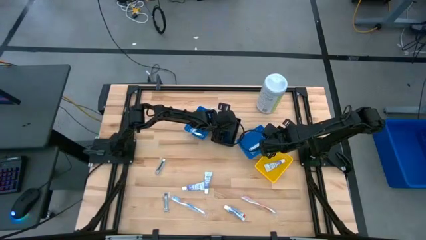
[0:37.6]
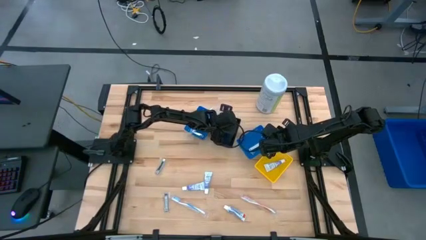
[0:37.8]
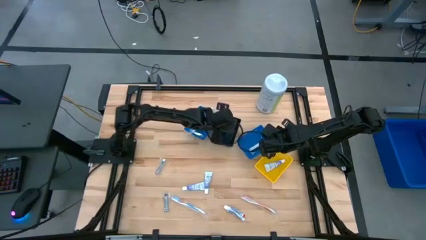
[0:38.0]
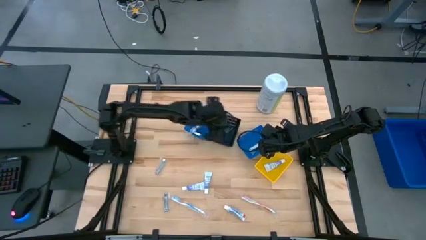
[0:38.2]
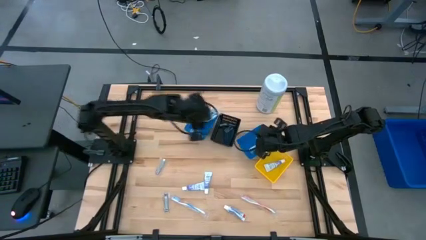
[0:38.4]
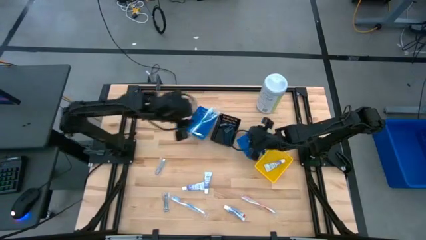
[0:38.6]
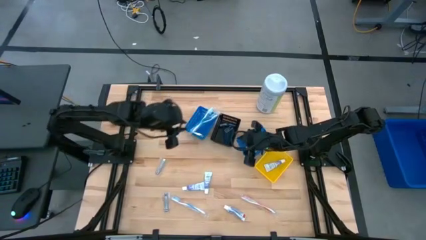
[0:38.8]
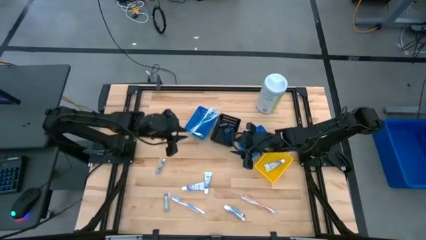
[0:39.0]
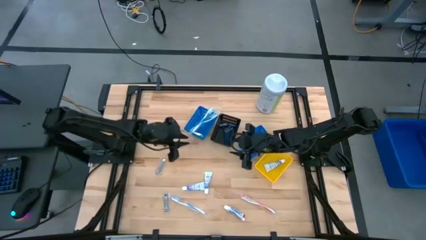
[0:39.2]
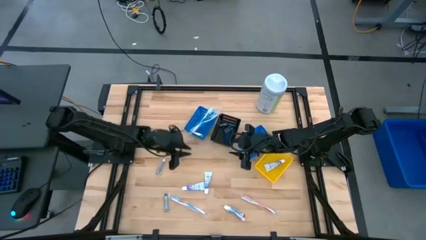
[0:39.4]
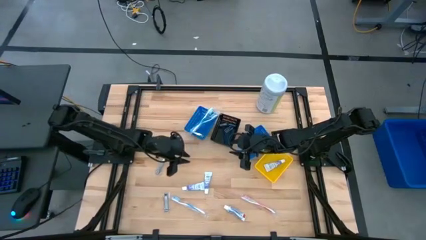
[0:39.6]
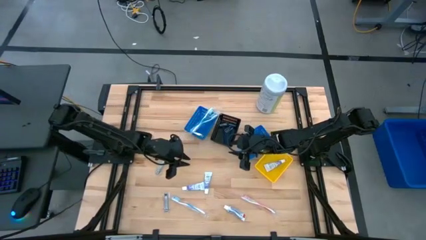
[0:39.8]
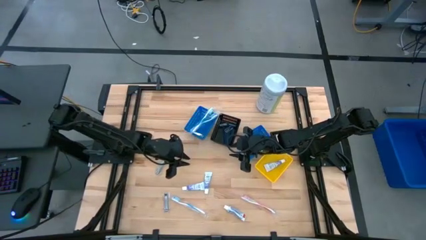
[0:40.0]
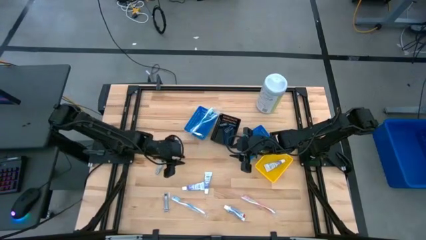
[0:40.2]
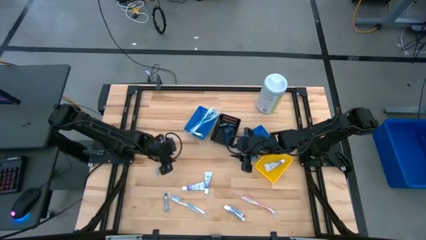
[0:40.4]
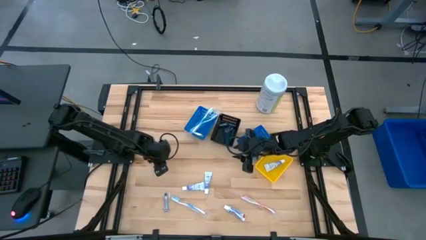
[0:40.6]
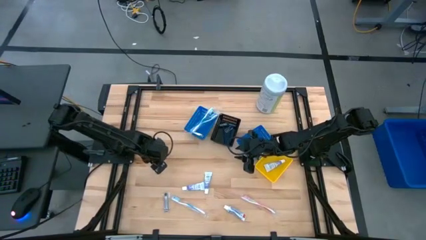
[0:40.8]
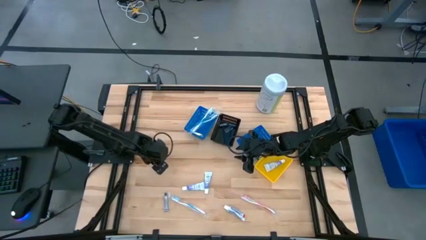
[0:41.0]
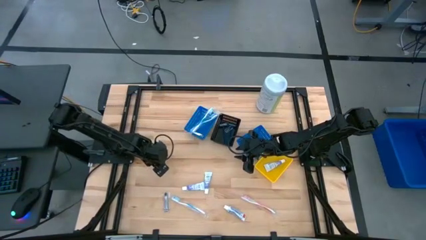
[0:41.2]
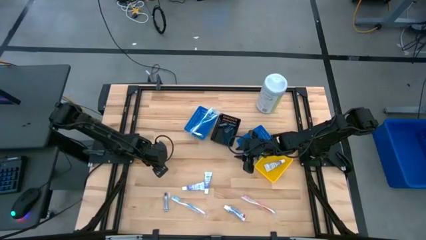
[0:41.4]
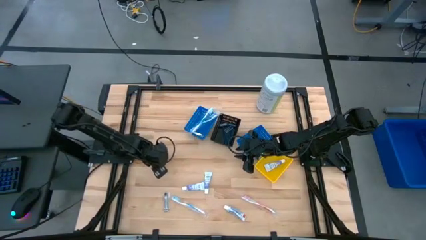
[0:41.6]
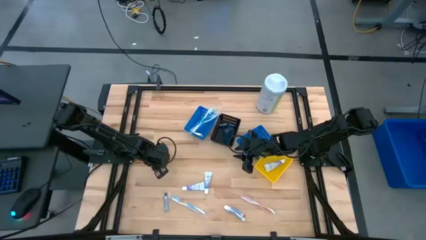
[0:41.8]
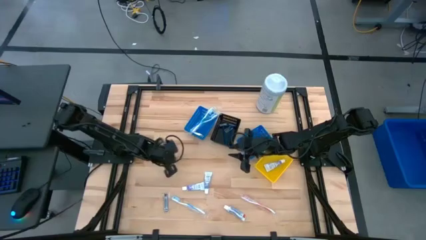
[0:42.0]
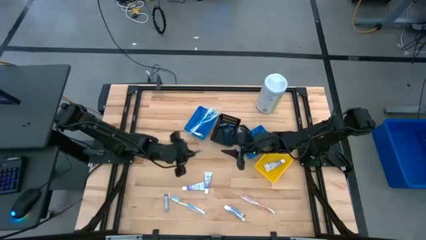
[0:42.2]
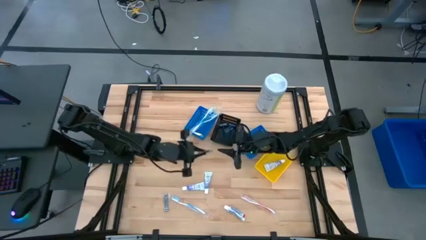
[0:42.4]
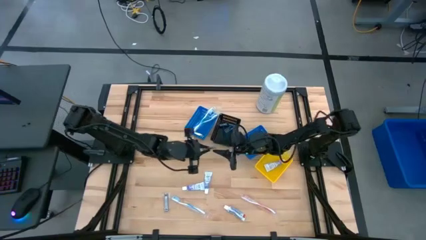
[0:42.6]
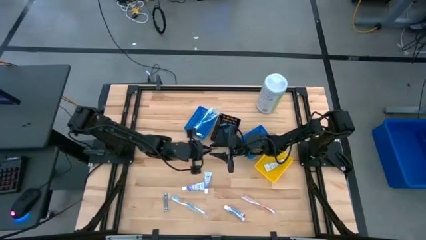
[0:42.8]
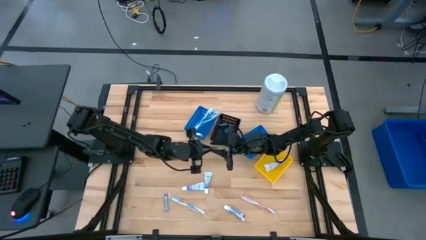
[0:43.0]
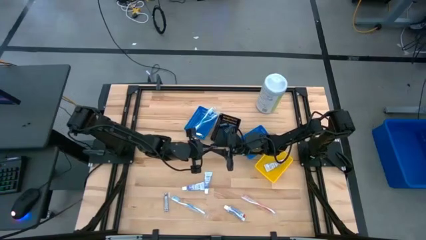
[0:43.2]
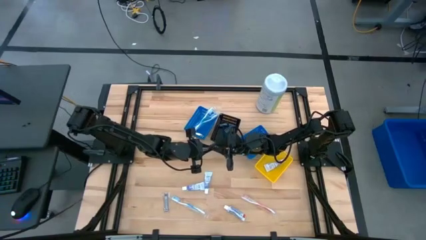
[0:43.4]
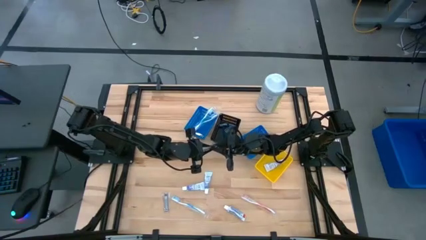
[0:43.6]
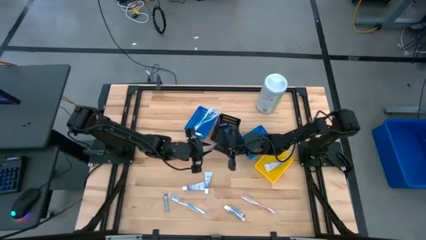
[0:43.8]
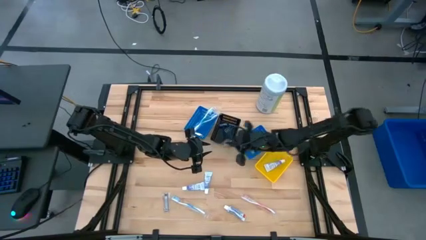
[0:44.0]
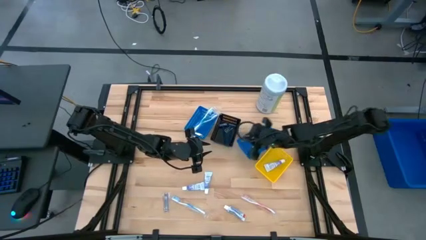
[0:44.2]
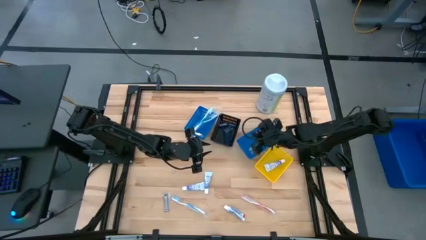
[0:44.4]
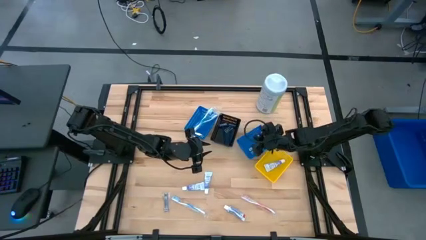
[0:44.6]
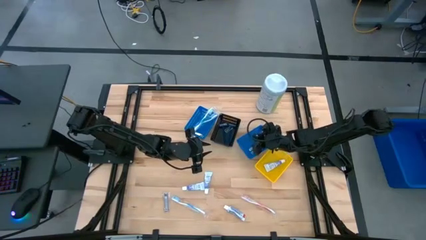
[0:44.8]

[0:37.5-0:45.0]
Task: Pick & Place Travel size toiletries
Put the top nail cutter into the right blue basket

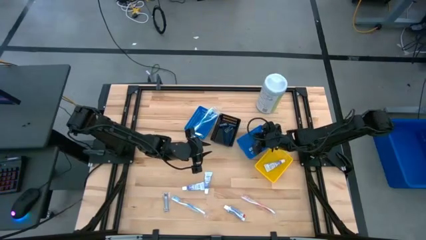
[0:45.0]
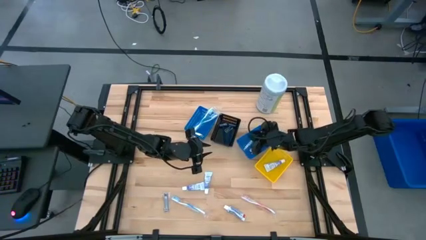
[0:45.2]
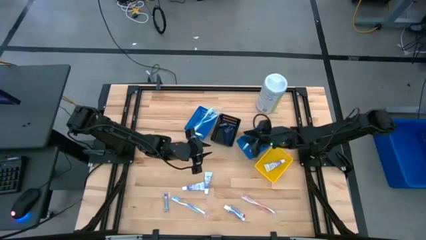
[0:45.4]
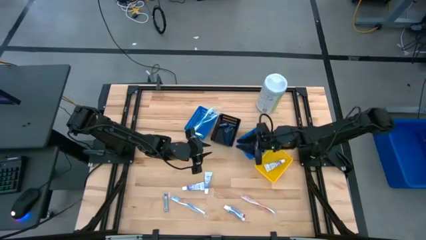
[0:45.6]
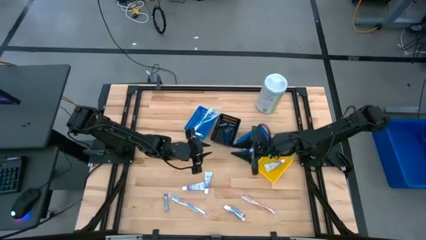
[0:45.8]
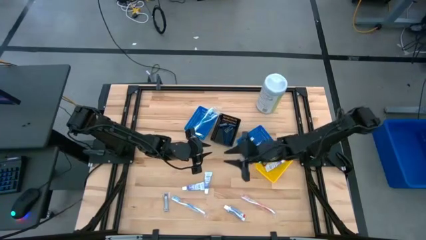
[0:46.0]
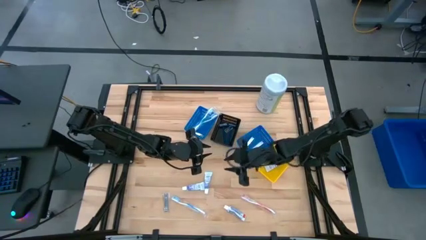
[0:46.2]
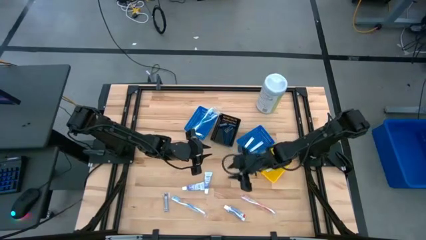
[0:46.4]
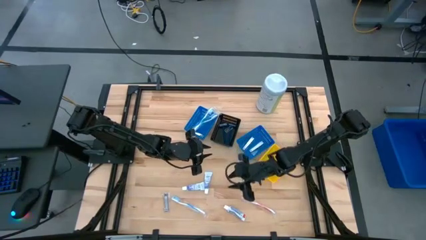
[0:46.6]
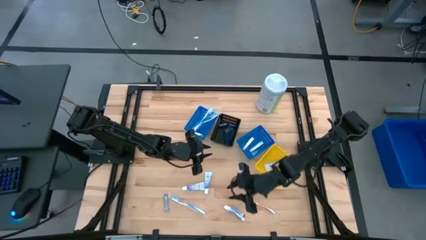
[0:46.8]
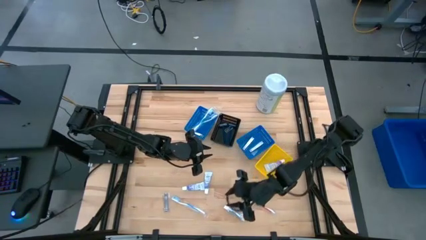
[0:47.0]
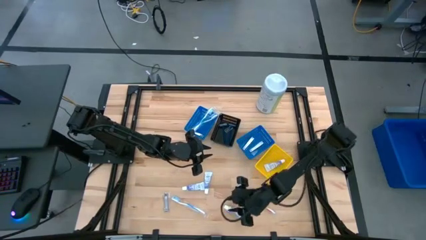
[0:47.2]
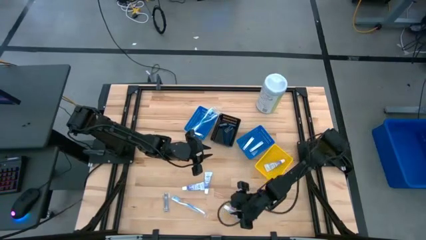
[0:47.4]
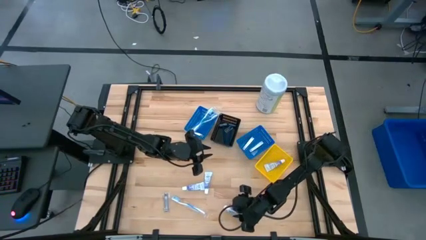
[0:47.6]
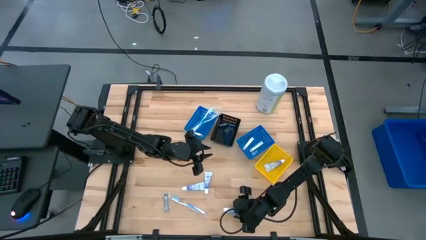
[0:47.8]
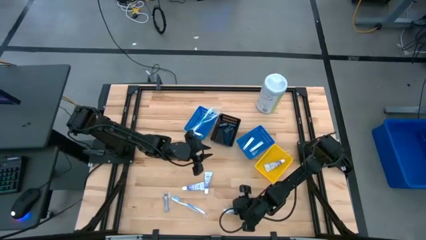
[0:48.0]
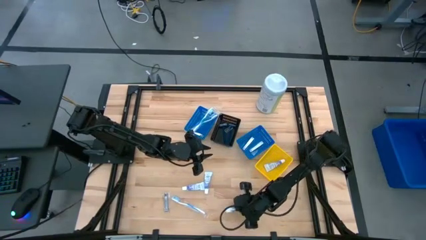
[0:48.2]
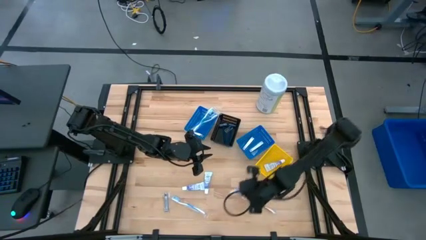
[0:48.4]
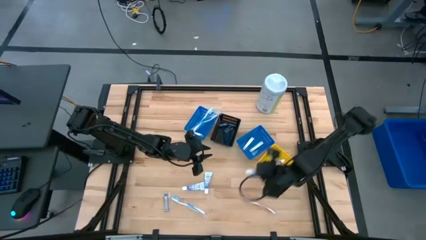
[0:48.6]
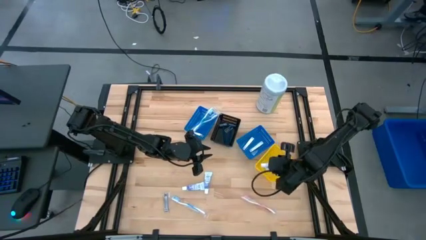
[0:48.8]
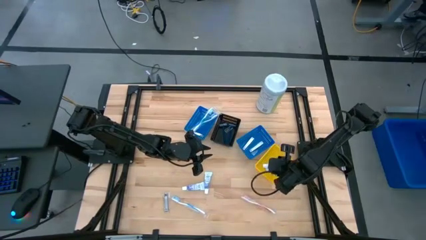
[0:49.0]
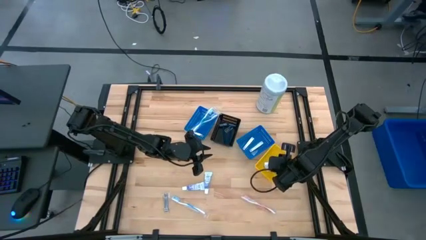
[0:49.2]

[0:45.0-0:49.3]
Put the bottom right toothpaste into the yellow basket

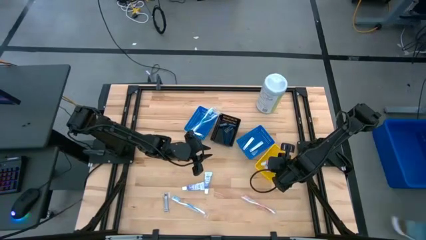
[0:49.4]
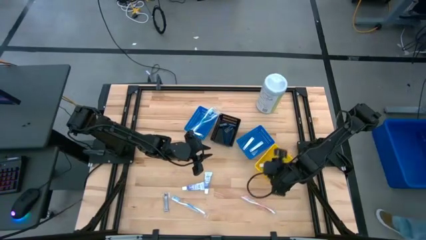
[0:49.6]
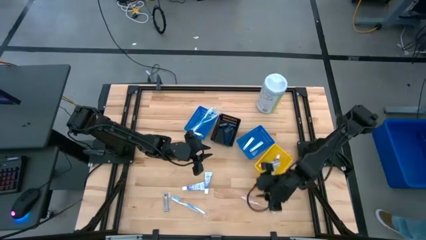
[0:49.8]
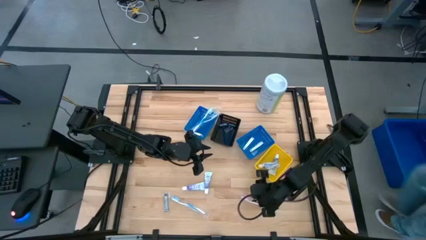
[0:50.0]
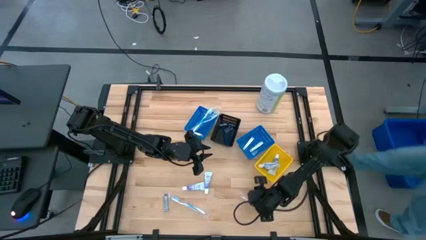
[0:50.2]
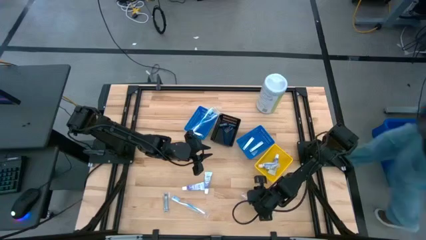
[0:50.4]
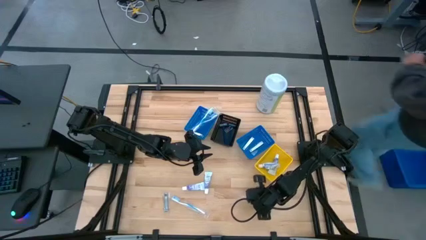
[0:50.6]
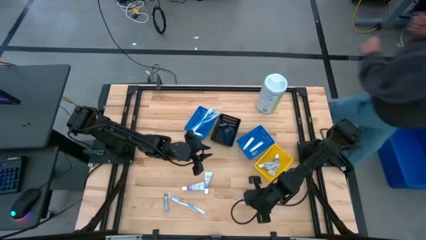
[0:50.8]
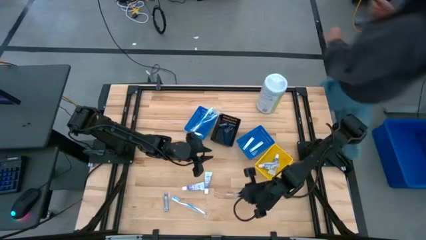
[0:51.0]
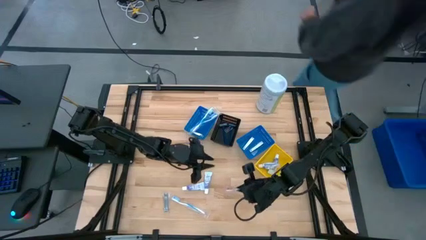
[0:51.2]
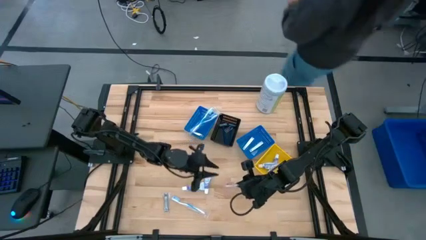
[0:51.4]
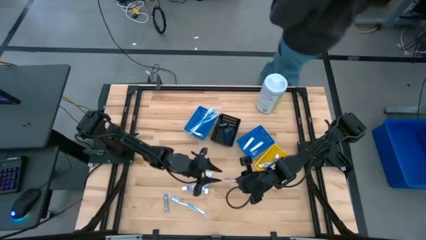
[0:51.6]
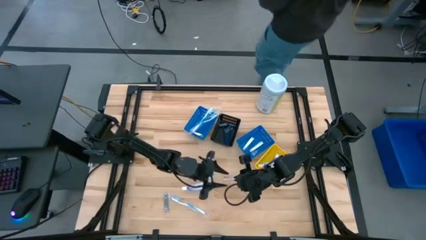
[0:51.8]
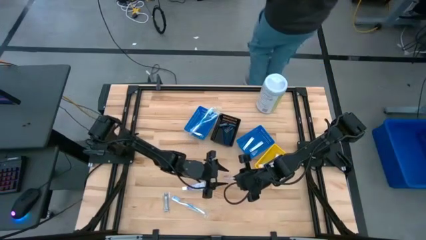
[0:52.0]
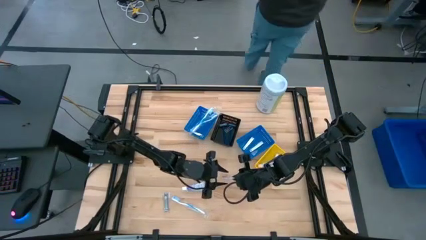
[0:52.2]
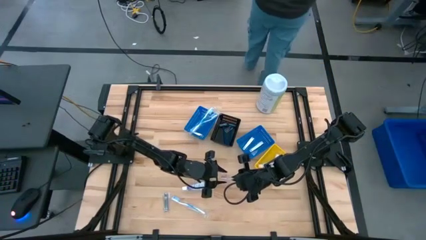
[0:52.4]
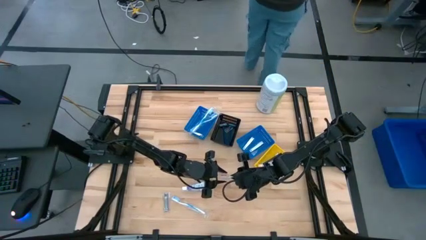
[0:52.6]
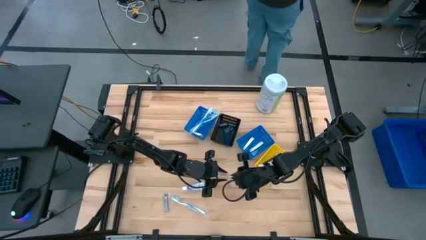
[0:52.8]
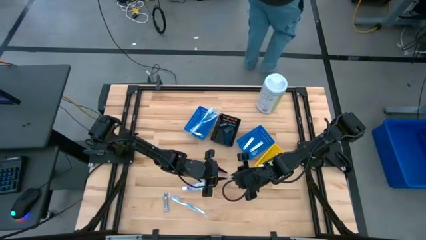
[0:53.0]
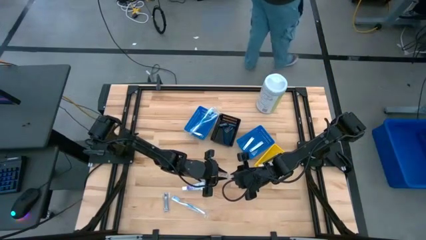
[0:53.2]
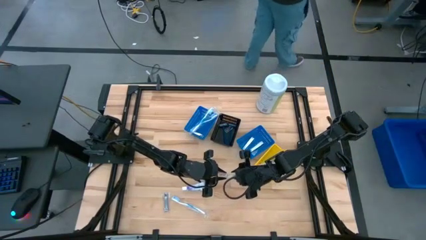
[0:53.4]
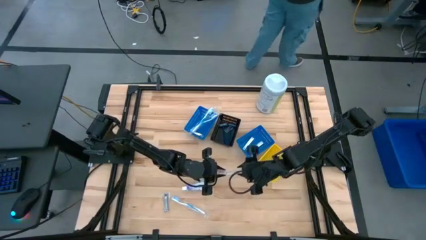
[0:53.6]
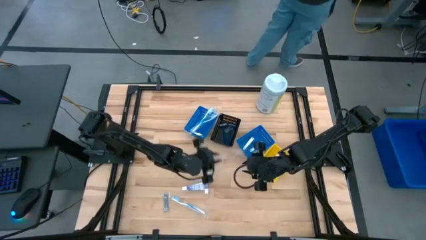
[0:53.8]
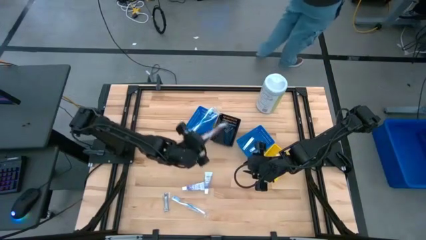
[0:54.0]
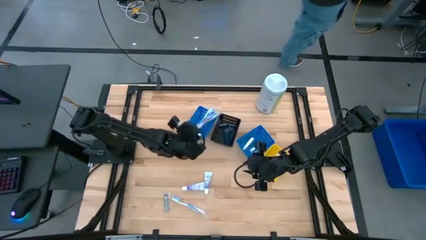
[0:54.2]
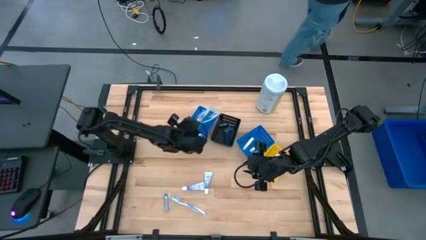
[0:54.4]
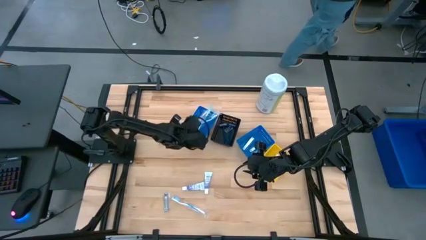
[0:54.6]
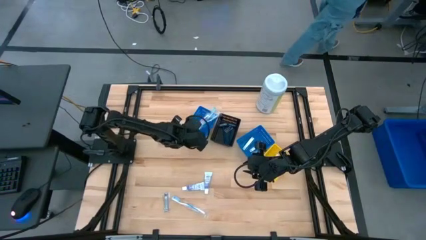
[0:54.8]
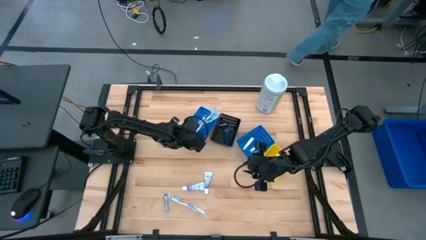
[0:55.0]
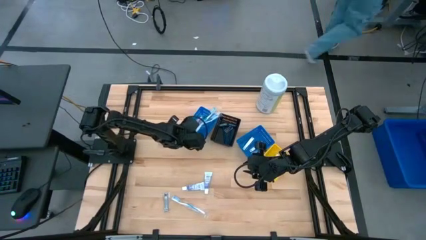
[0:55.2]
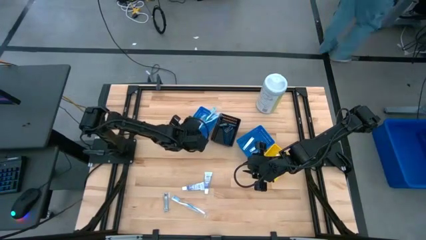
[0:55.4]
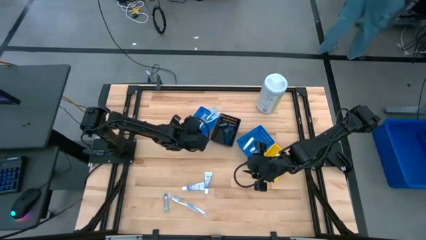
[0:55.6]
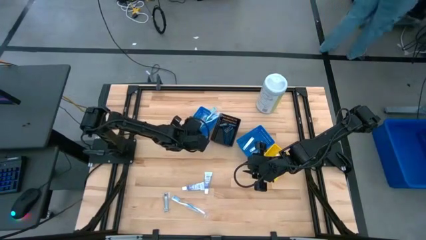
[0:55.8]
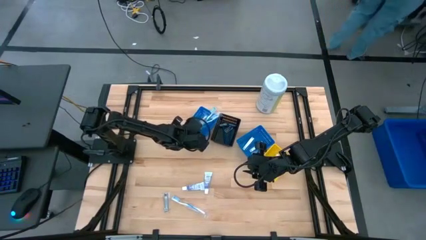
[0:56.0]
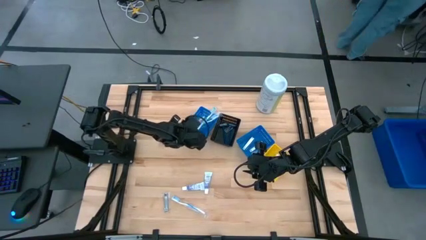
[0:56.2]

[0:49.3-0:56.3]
Put the orange toothbrush into the left blue basket
